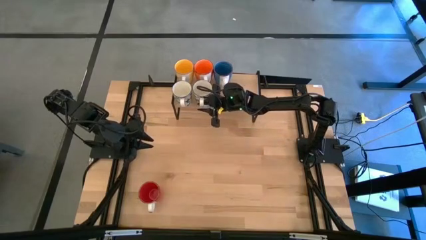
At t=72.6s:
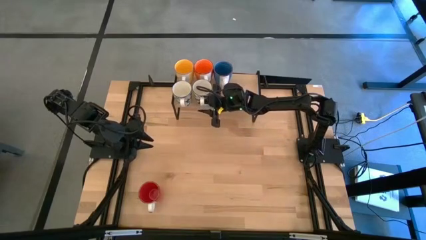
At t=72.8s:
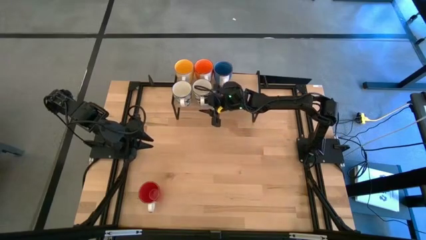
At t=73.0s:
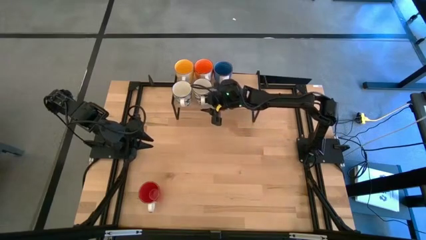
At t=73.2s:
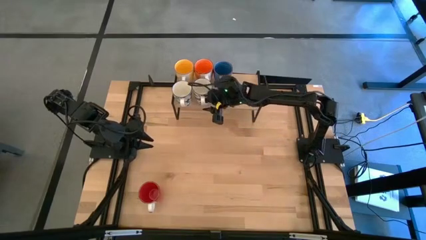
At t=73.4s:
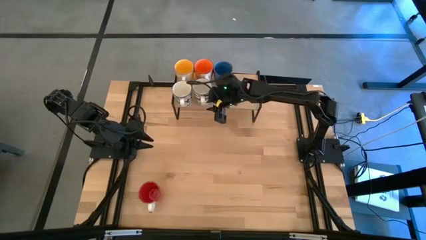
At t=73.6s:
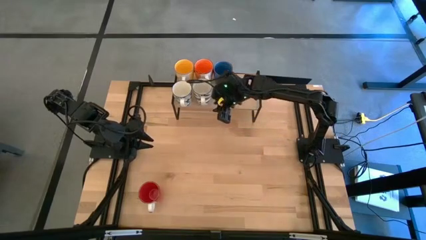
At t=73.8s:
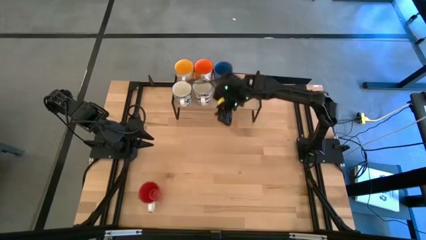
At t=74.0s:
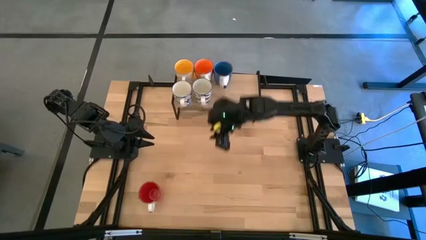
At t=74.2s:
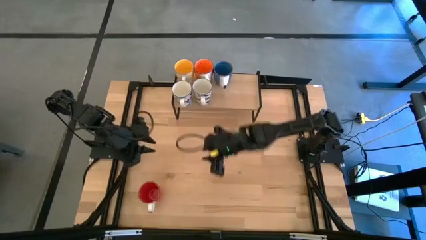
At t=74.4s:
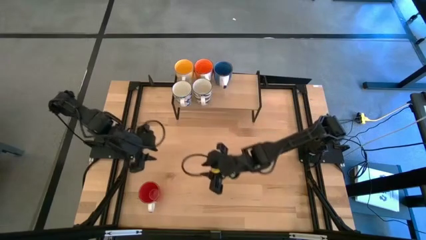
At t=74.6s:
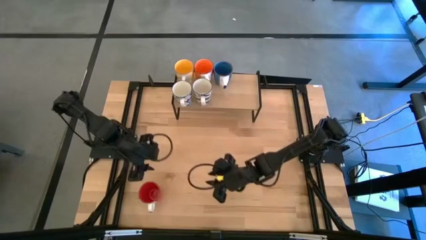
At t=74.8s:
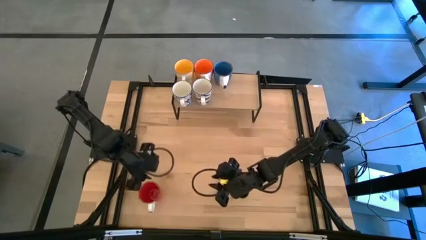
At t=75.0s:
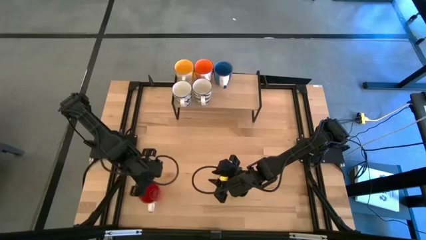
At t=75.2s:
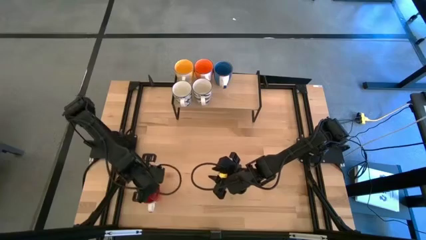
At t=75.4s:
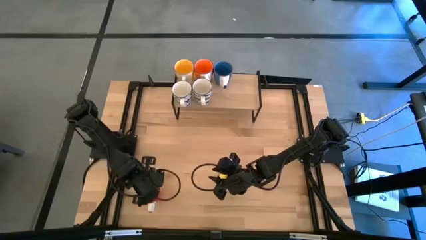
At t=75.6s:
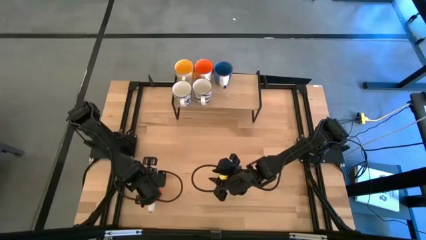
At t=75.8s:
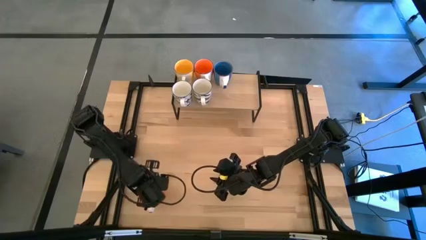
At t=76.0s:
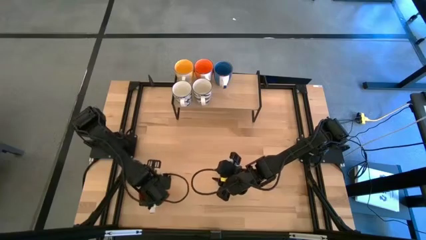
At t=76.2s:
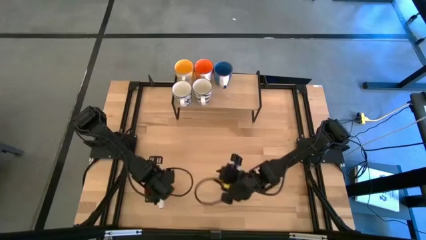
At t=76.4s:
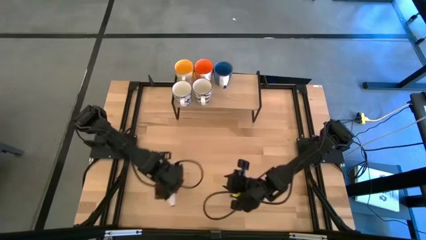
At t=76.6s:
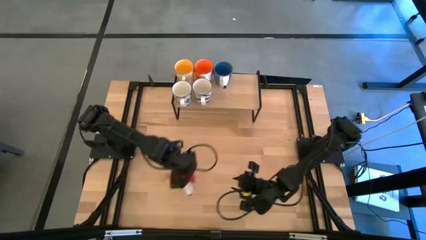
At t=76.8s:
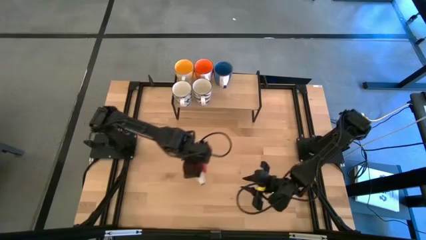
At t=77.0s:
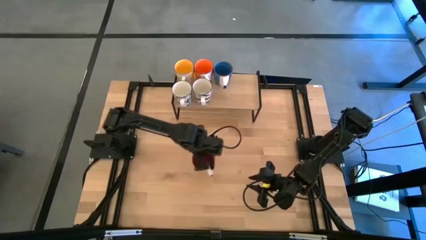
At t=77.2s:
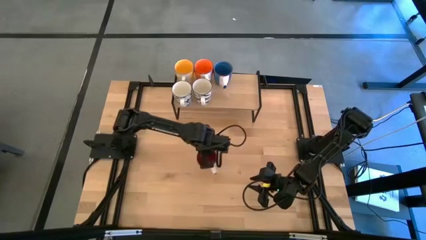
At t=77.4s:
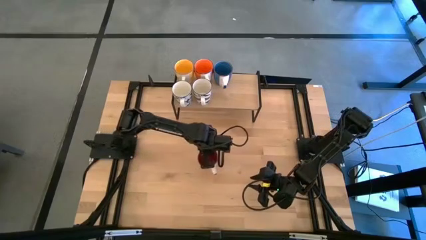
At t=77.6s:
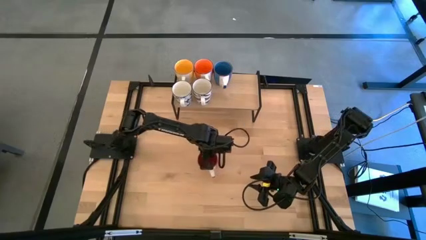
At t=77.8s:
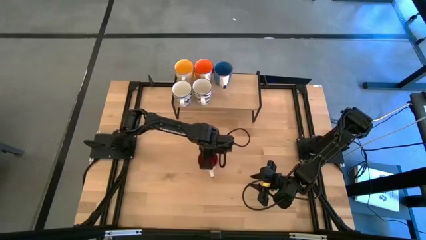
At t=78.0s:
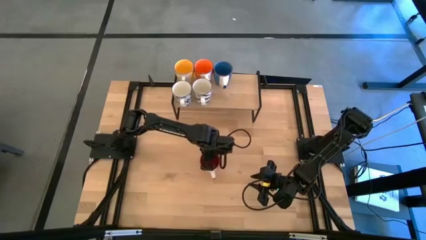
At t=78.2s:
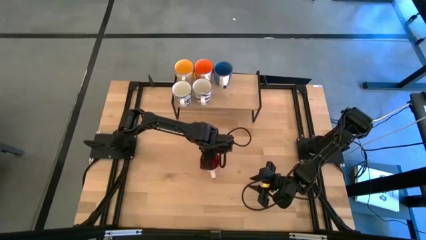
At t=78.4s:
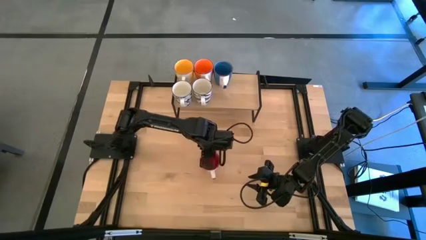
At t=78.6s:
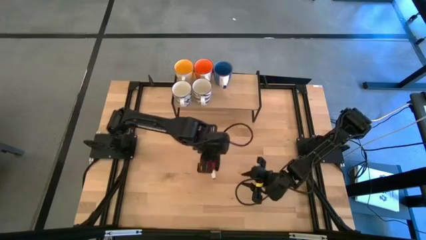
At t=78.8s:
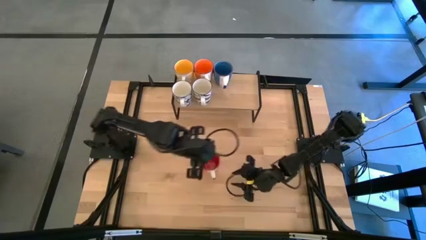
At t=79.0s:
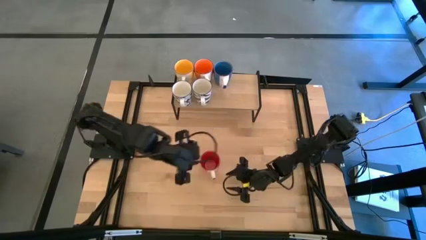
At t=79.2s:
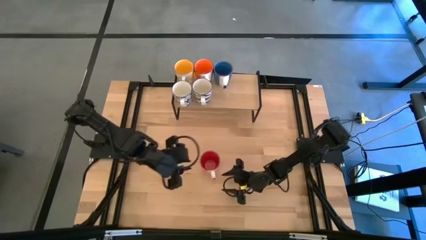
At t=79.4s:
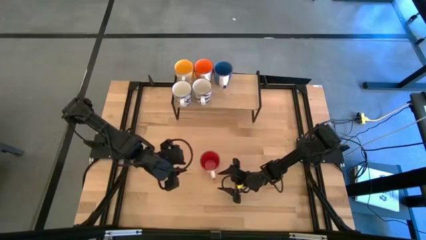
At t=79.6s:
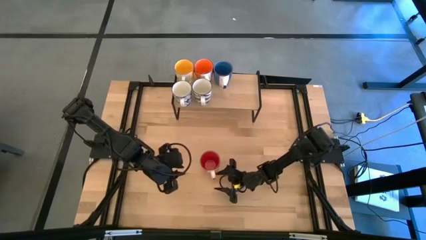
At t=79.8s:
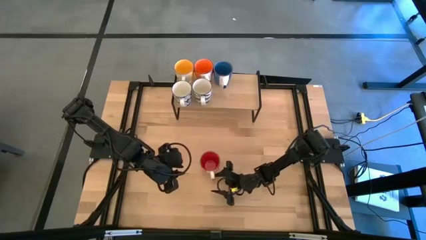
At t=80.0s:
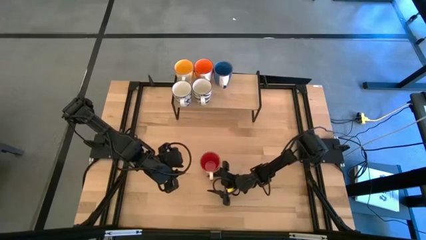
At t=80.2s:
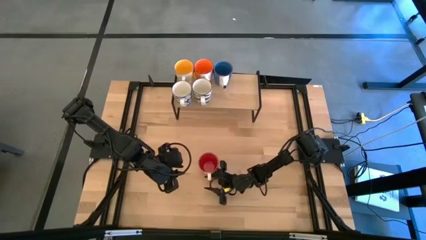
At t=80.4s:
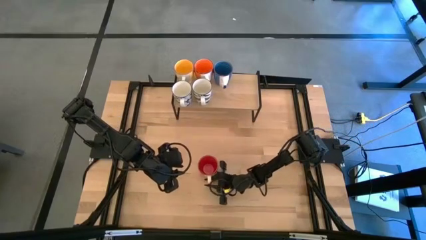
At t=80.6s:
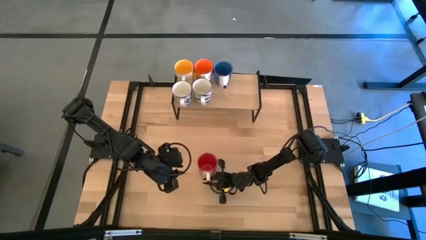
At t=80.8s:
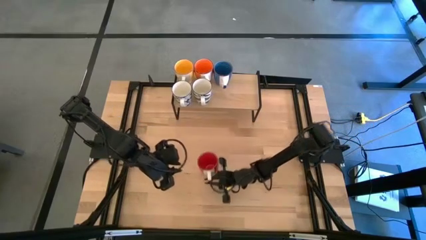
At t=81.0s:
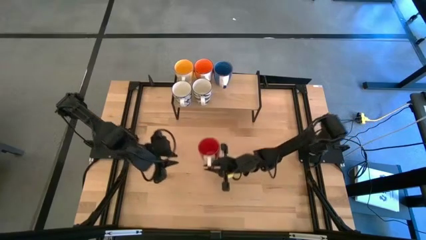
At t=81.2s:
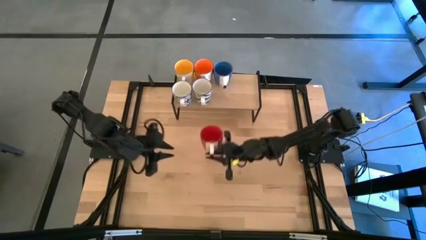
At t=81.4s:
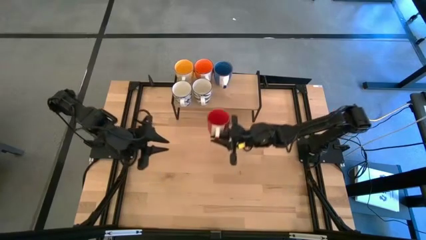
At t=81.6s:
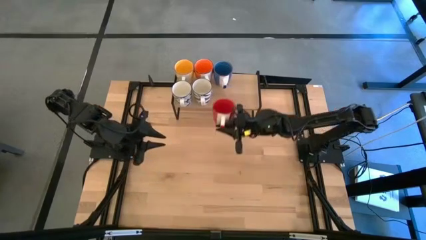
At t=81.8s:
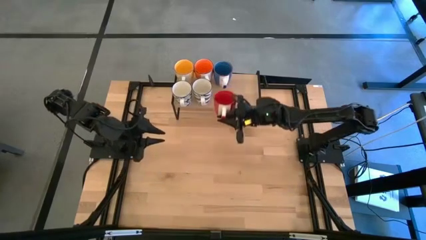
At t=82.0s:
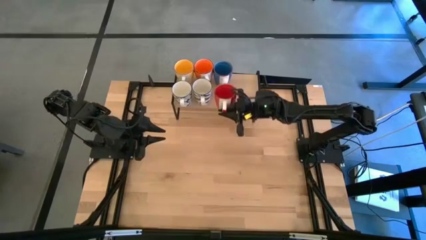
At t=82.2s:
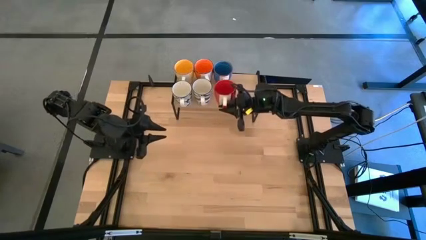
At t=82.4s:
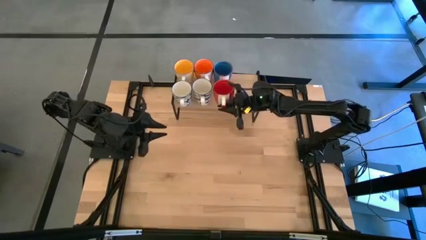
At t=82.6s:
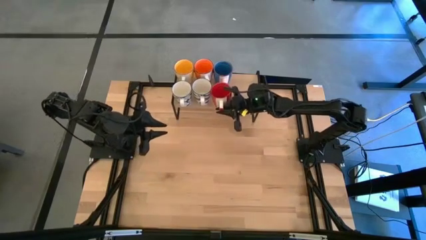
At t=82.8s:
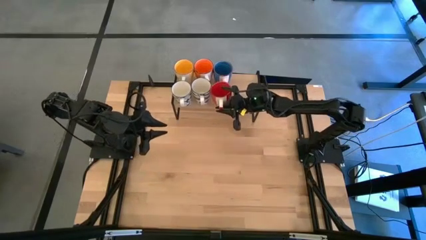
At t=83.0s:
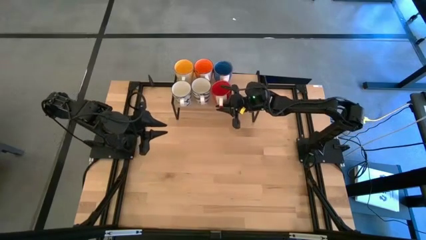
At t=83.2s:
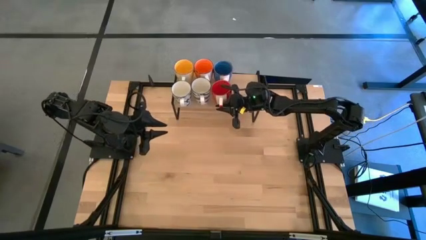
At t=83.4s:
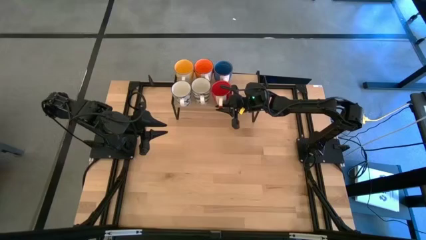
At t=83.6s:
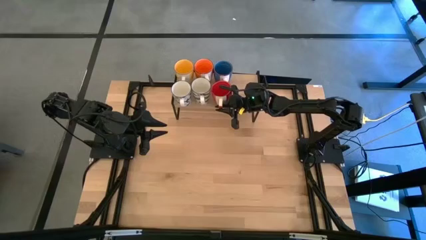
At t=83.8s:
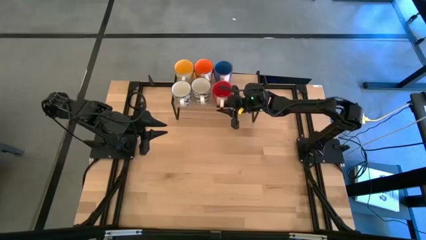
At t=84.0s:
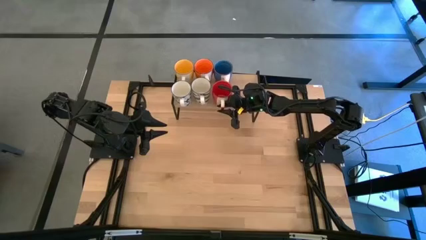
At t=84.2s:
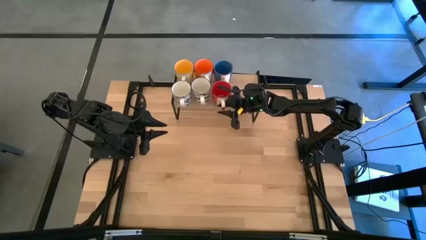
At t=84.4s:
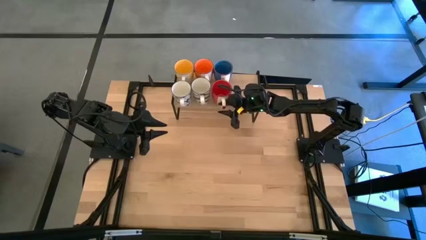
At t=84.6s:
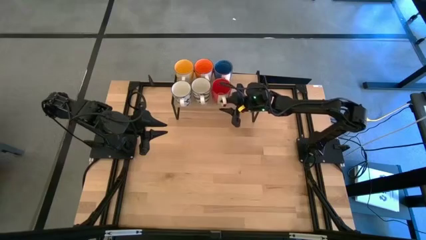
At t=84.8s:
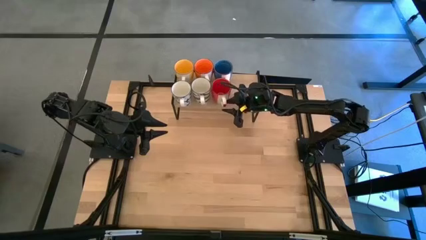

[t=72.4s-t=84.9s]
Task: Place coffee mugs
Put the red mug on the shelf

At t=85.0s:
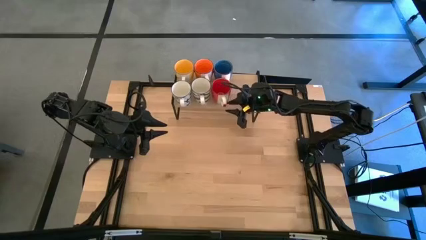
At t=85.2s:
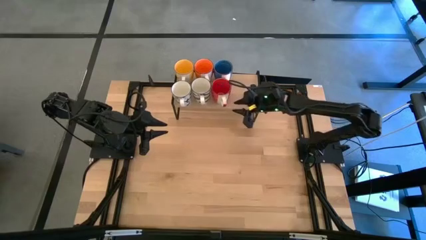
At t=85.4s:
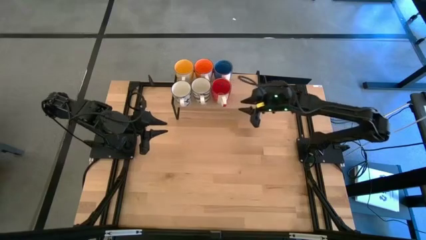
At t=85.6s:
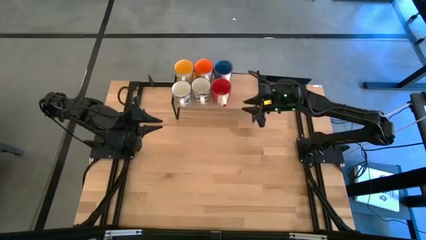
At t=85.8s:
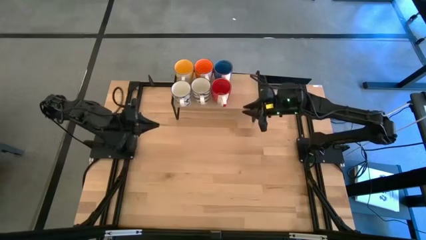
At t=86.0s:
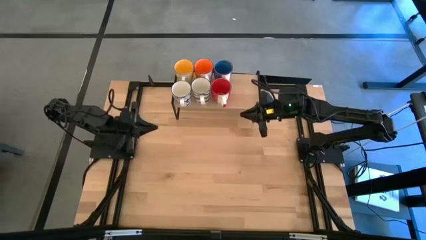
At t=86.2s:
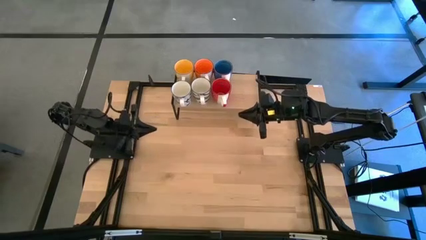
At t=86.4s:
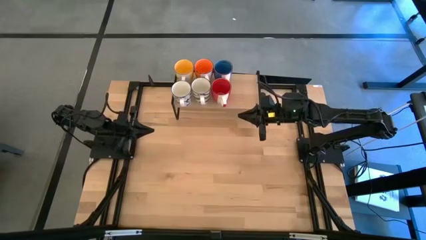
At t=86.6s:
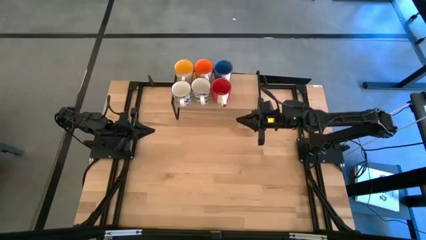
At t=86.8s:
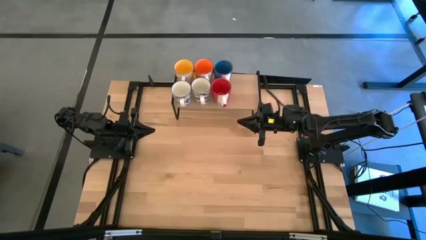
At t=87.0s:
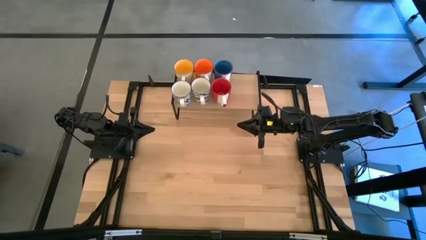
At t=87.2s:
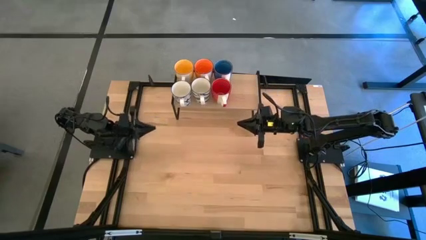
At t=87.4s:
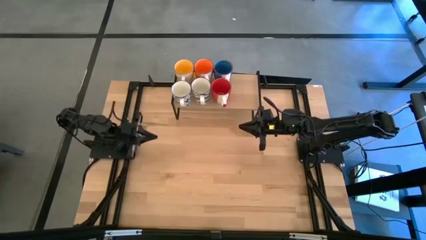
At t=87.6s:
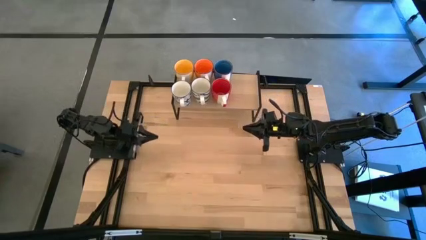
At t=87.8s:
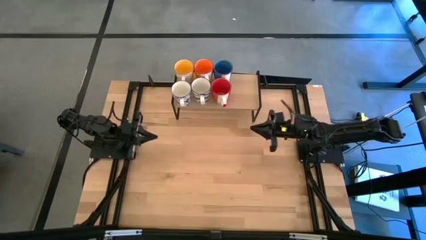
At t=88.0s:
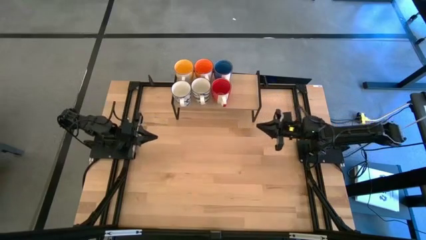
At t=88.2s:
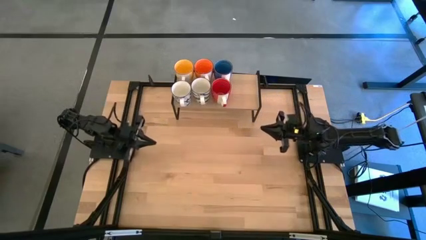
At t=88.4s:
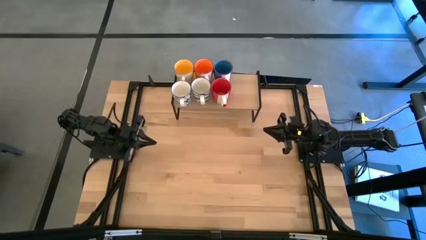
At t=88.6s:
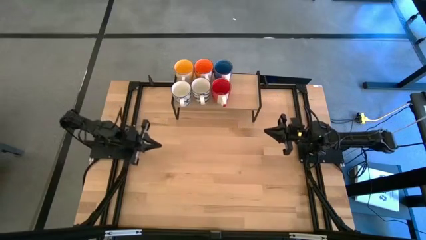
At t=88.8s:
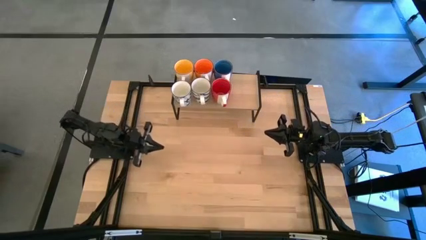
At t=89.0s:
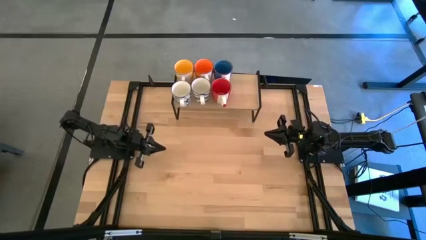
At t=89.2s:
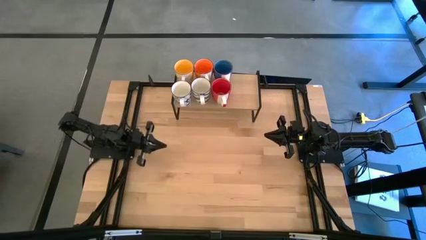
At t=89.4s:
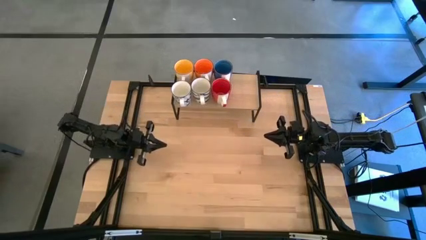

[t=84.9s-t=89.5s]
Return to Home Position
